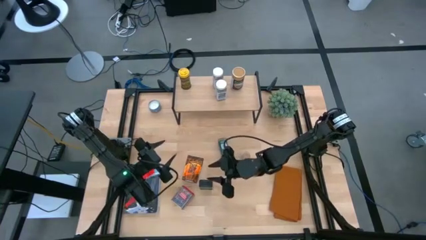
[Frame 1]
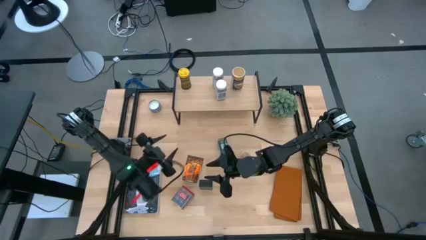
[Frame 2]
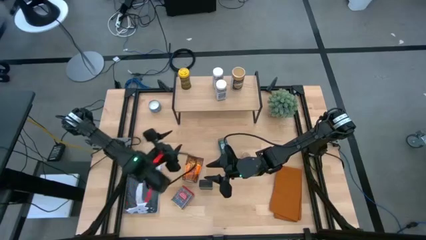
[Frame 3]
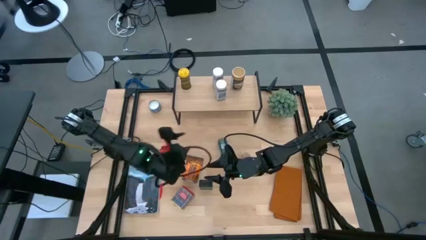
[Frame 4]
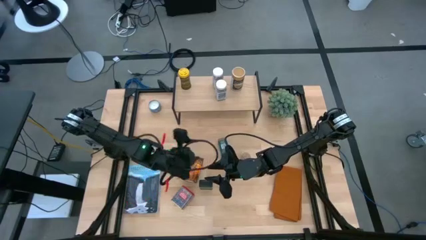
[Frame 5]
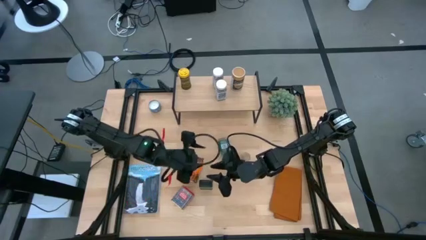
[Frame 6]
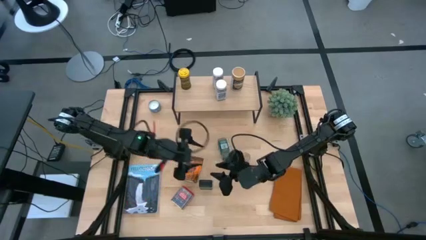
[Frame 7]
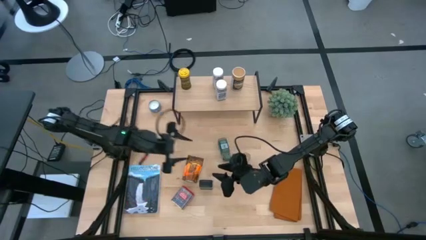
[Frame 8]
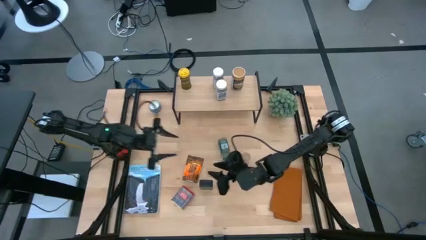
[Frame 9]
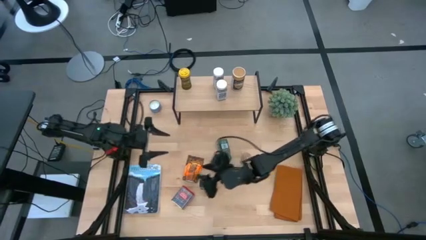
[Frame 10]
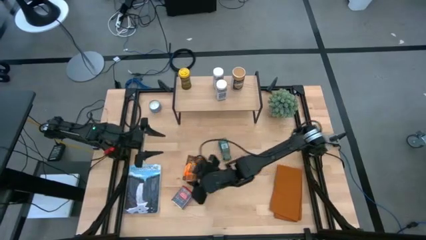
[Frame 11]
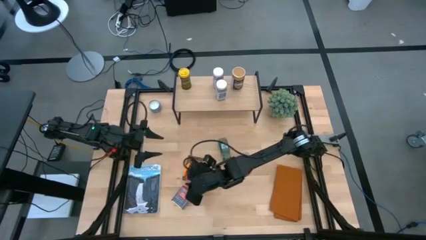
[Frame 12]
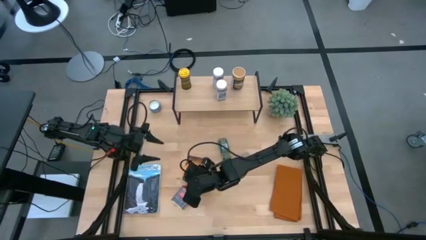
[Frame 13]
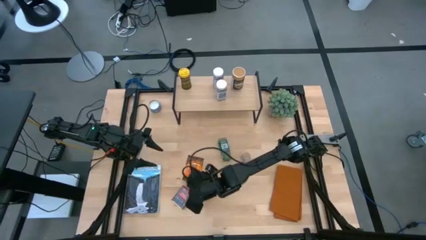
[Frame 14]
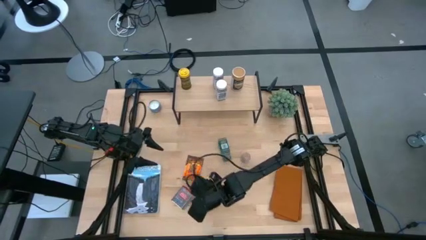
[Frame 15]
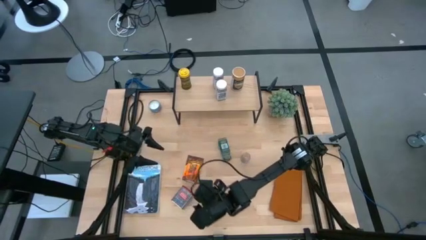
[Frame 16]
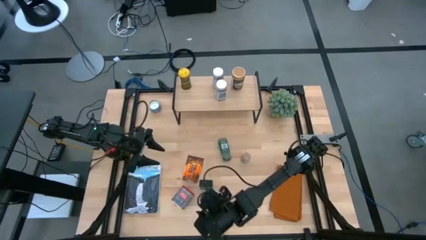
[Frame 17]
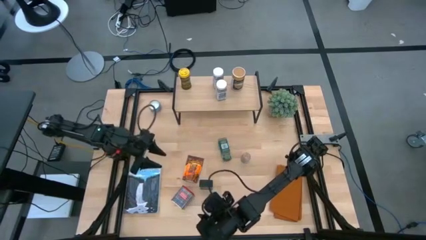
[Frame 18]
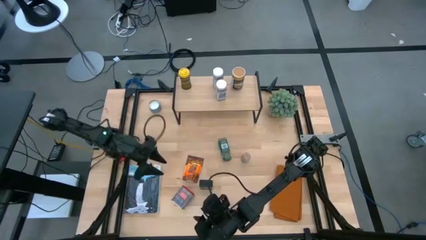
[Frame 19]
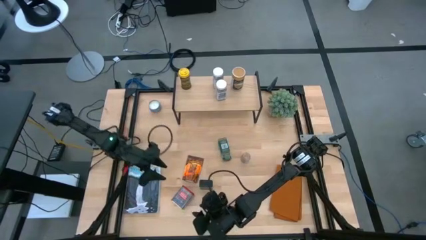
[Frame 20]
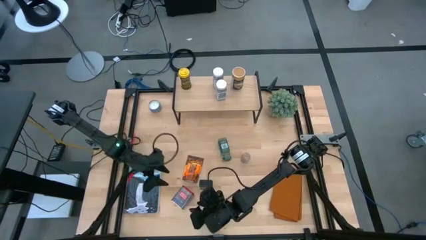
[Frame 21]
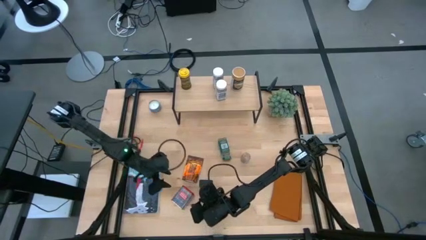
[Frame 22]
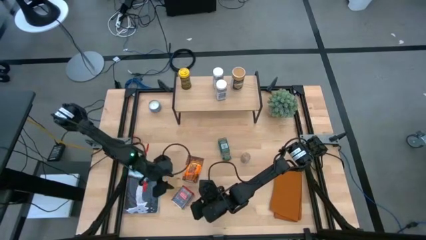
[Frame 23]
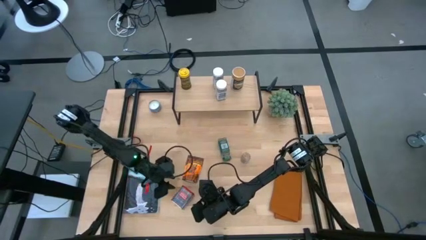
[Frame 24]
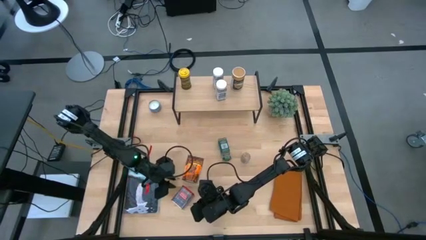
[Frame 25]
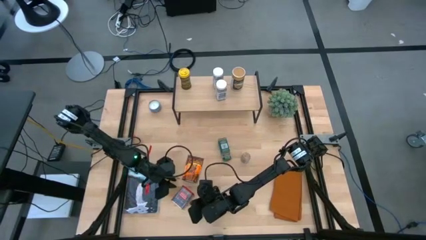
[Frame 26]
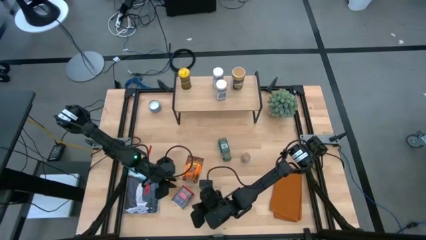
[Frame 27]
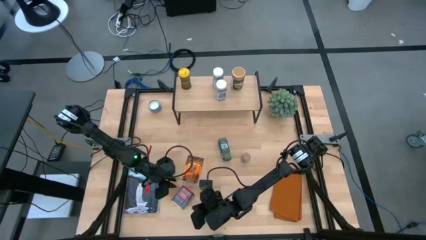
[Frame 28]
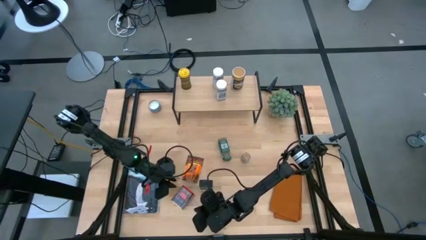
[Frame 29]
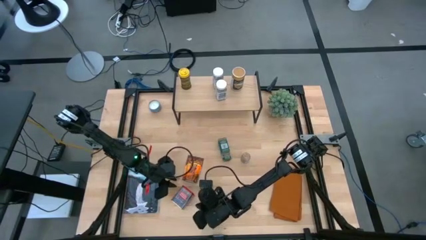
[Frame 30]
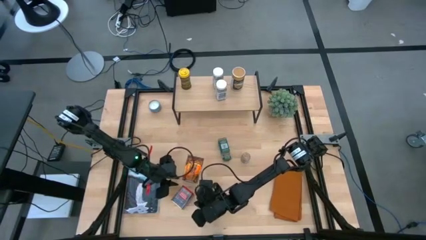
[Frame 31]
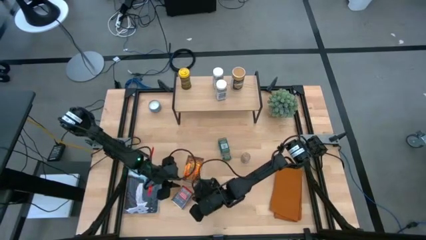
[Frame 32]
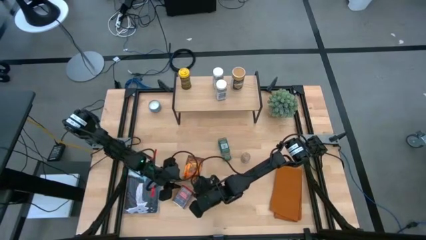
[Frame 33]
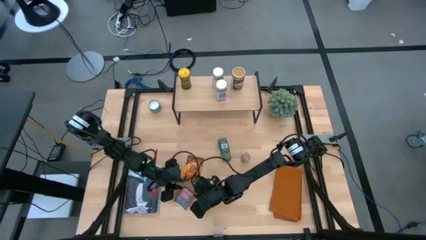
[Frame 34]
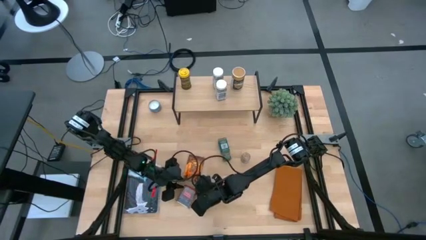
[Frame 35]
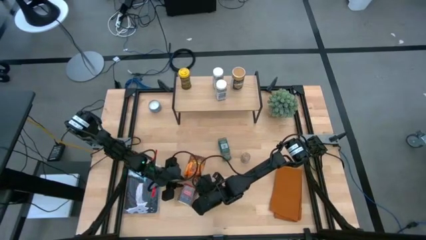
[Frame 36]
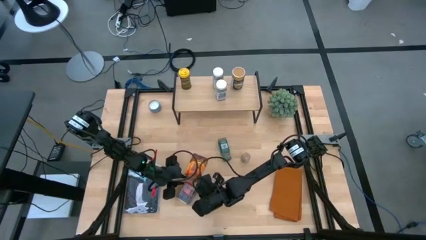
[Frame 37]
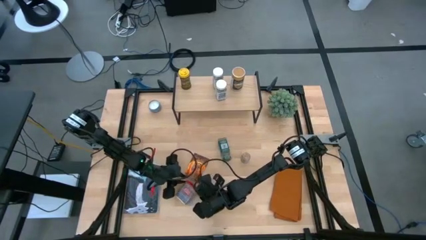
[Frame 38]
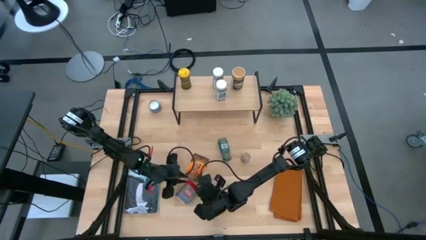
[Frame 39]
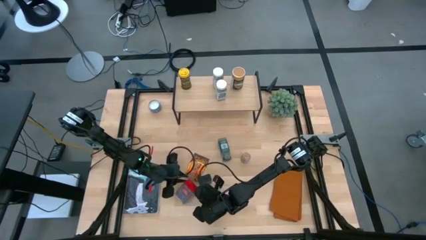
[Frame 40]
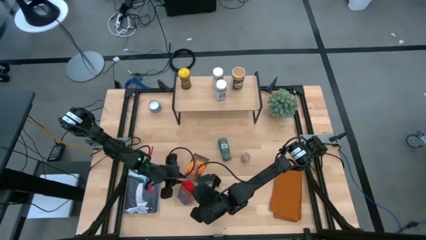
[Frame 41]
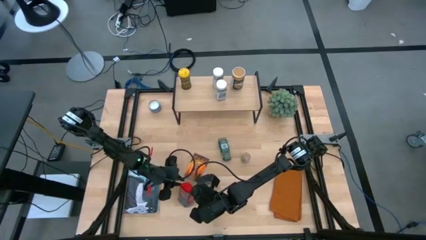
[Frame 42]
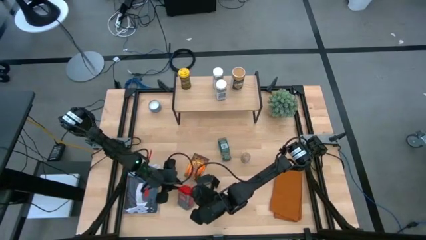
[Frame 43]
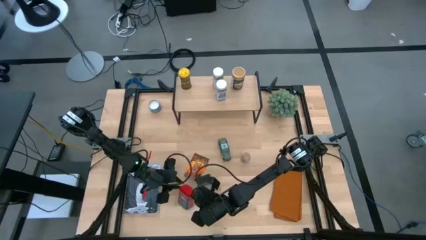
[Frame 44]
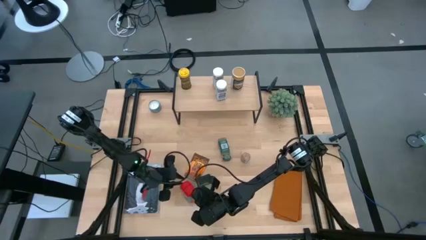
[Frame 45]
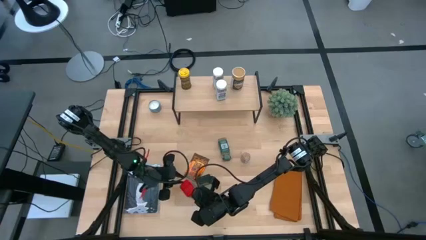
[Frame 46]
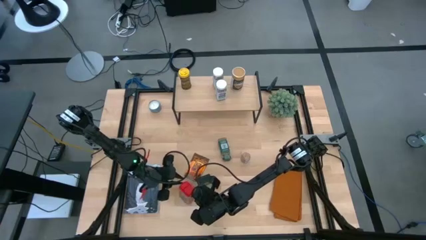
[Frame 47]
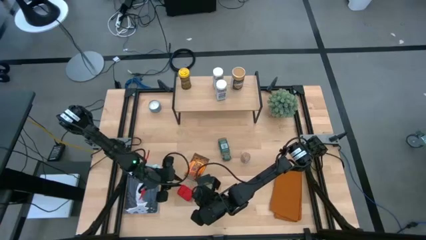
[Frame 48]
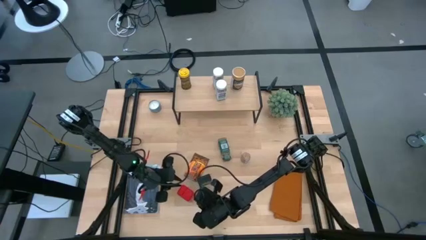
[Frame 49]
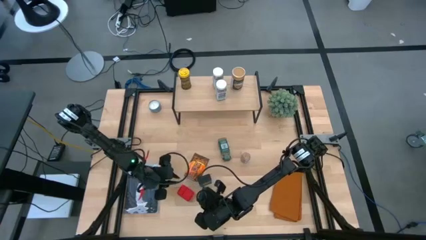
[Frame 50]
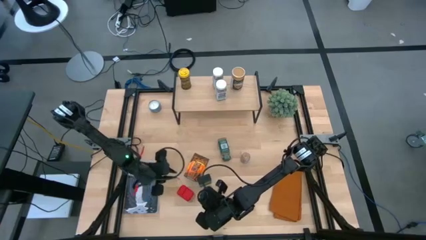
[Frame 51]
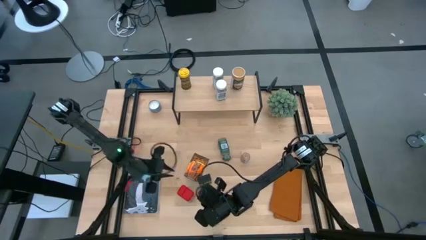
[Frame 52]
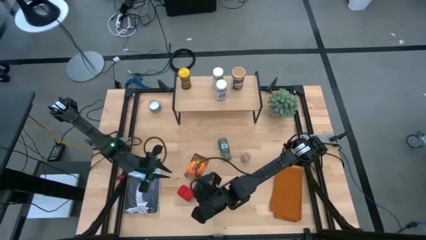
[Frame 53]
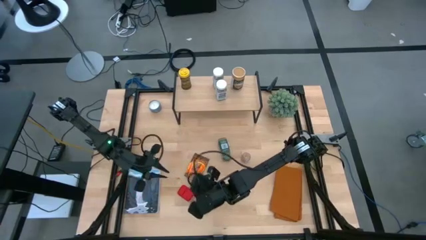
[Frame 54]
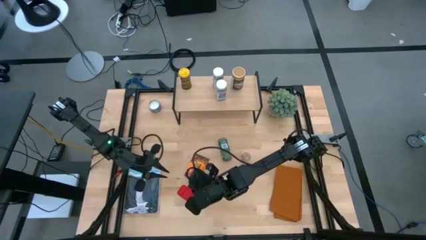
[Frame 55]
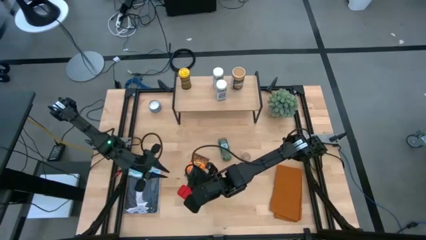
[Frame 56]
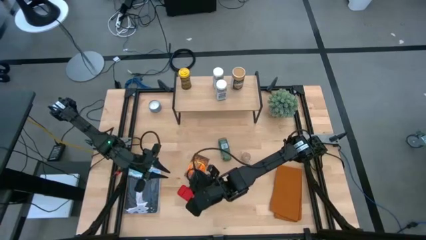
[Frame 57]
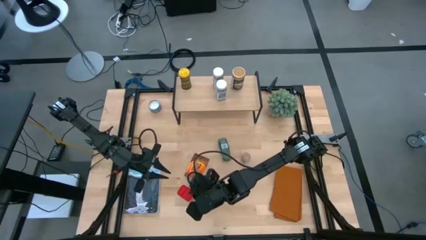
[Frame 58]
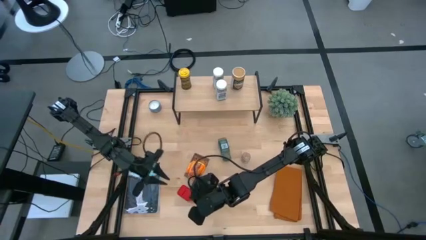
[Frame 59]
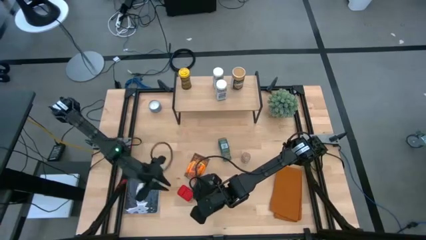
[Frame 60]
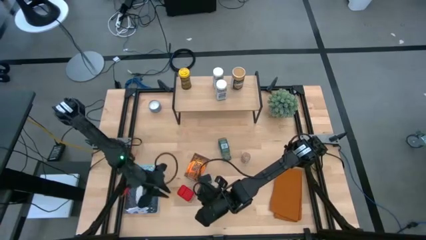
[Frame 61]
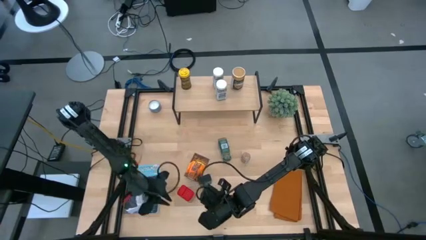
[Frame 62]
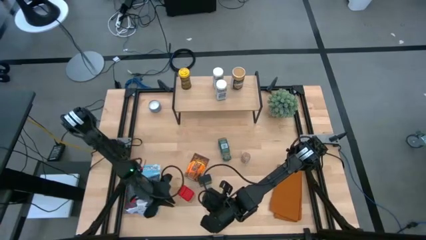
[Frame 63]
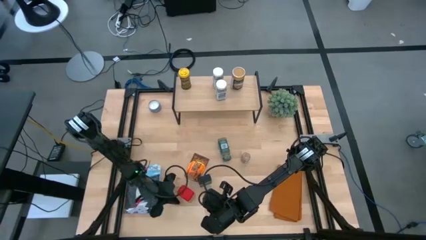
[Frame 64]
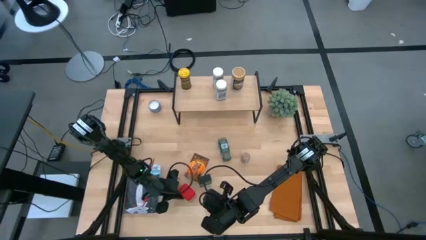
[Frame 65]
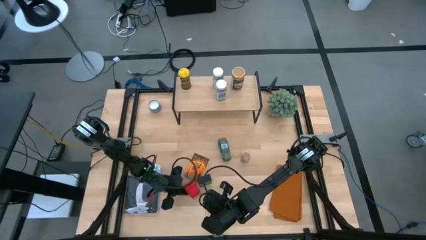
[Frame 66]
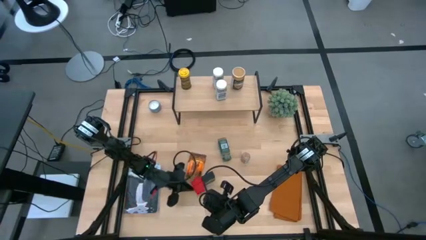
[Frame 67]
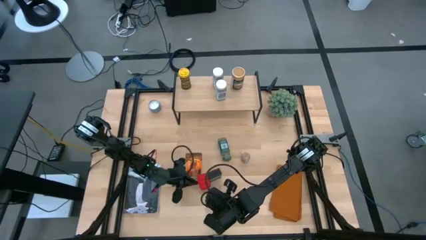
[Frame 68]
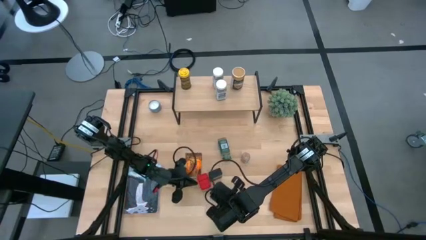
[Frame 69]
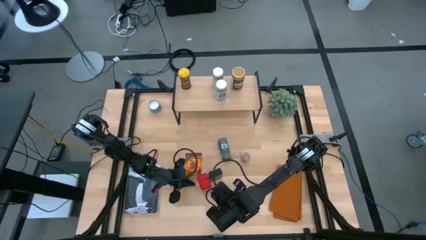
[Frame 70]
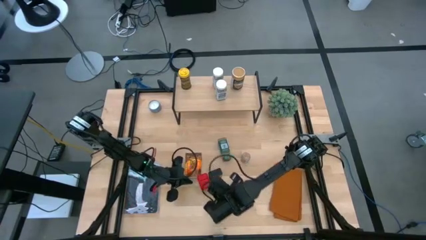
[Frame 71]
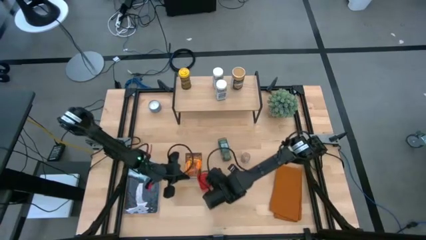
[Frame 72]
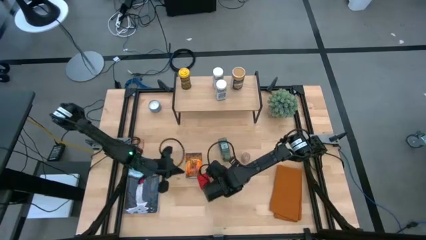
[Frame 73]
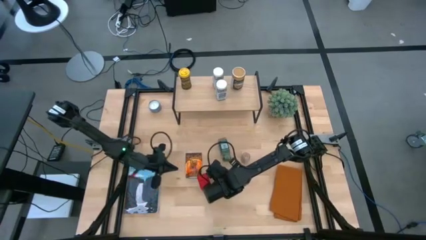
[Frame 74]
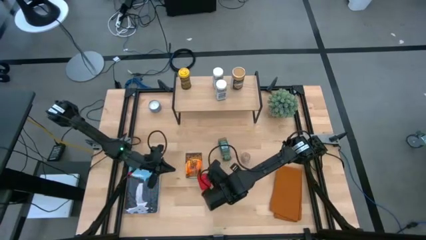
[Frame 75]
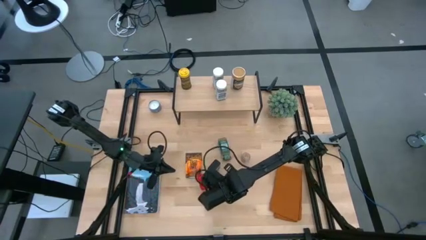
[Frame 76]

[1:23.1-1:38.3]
Task: Shelf spices
Put the red can seasoning on the shelf
